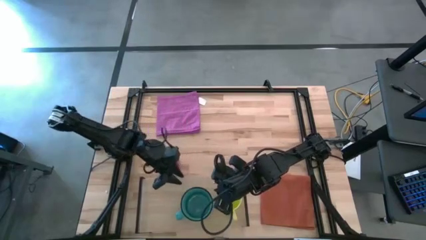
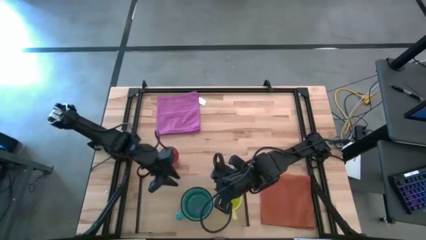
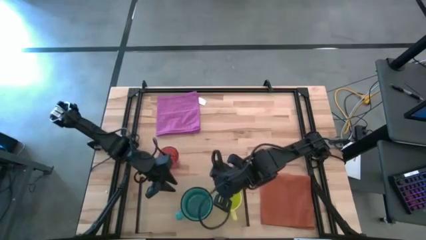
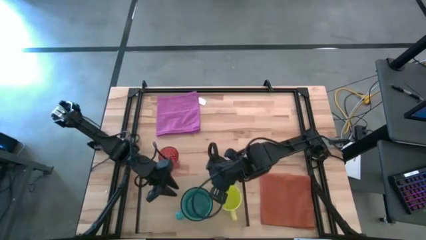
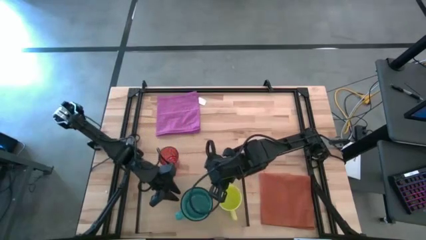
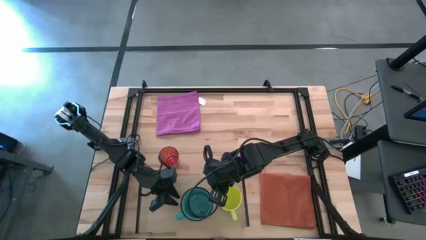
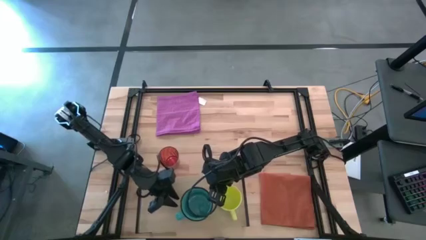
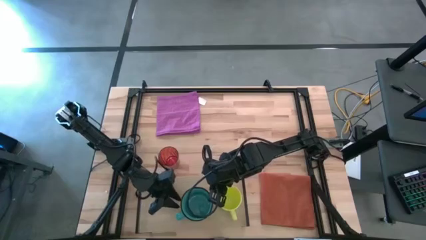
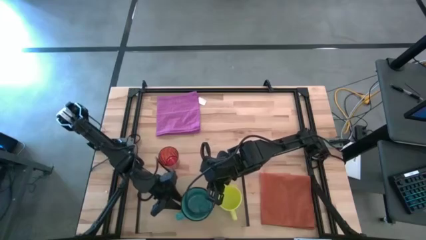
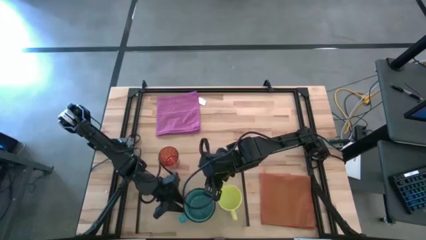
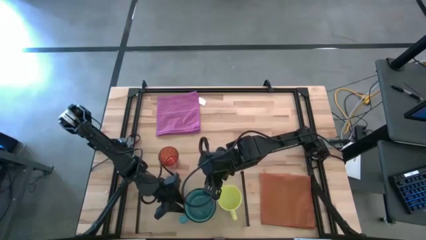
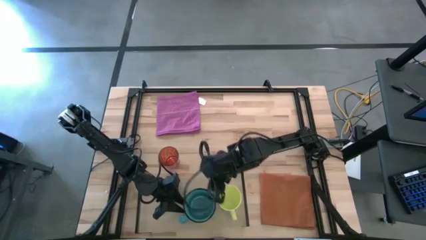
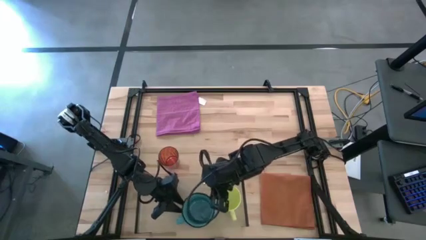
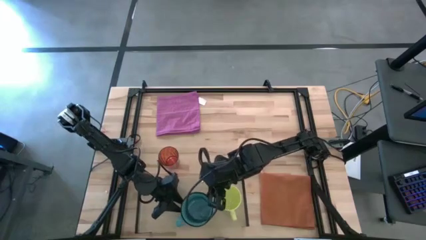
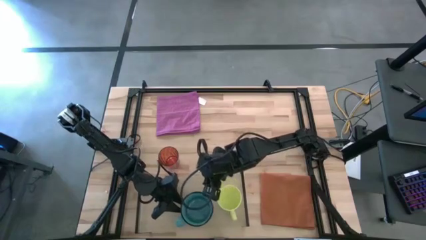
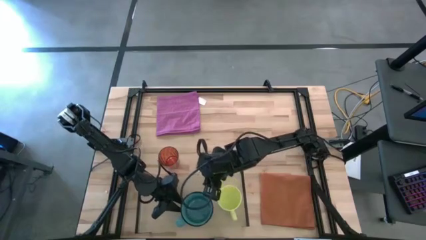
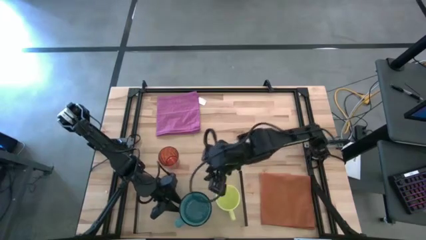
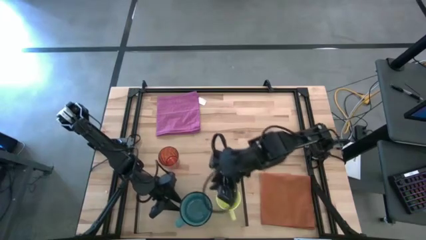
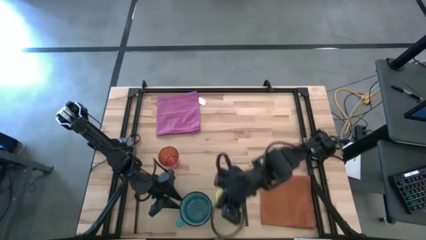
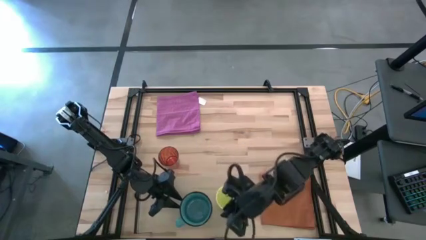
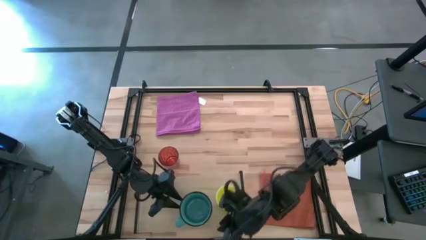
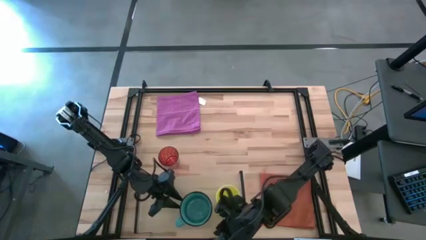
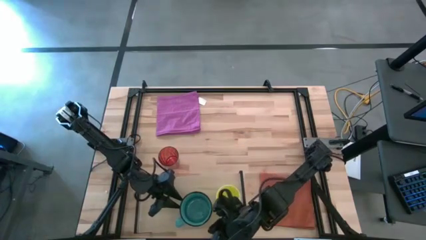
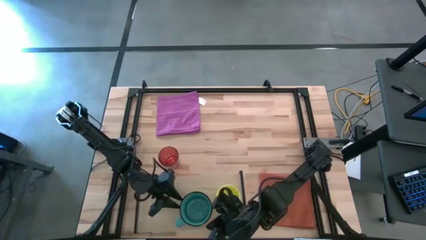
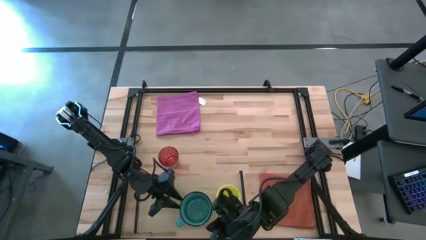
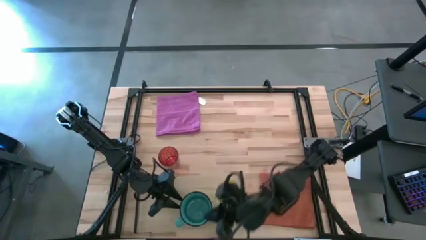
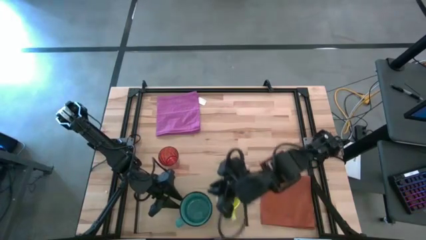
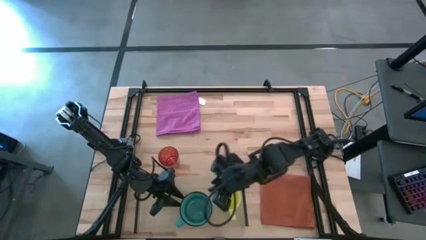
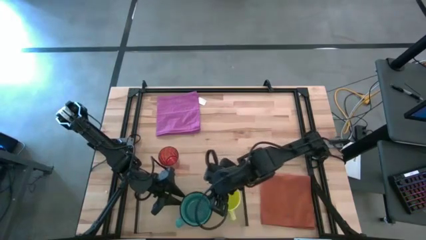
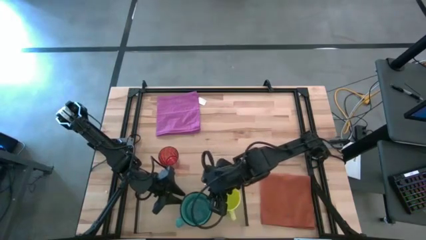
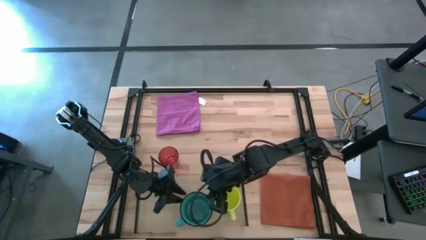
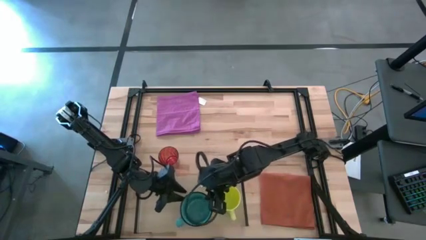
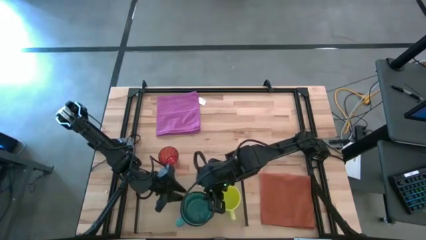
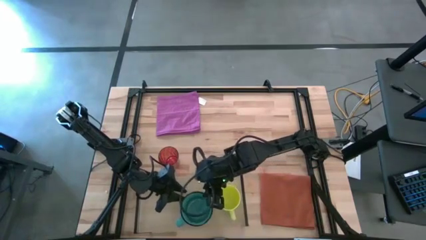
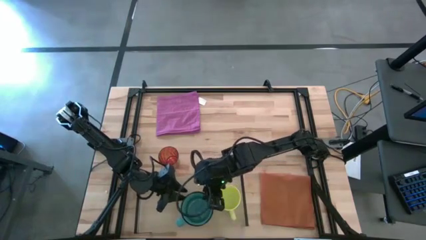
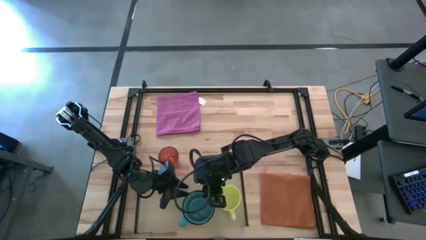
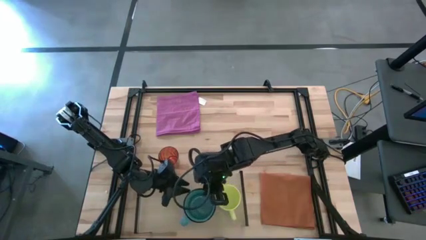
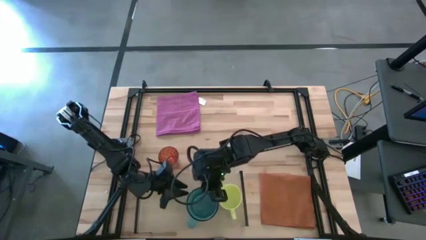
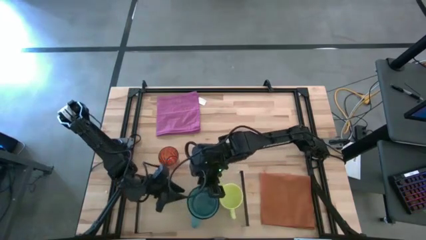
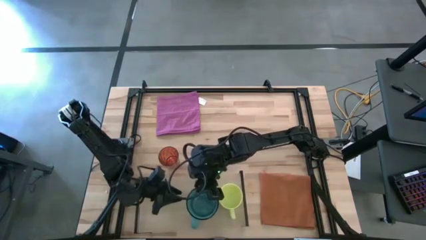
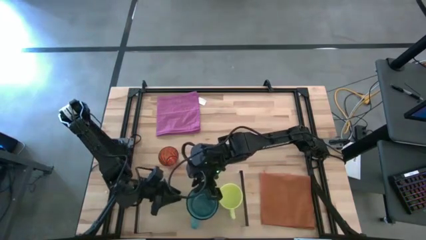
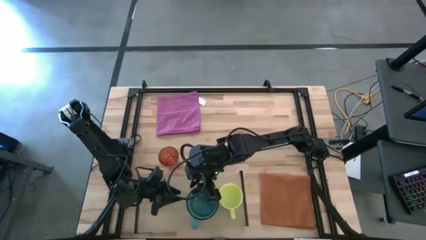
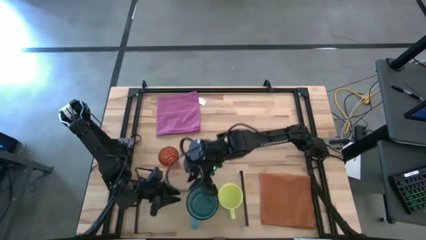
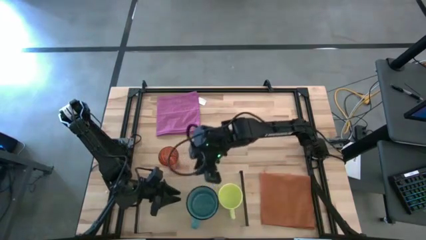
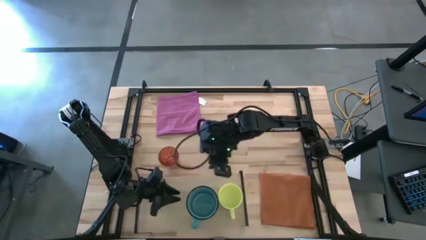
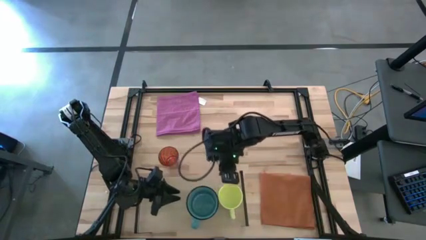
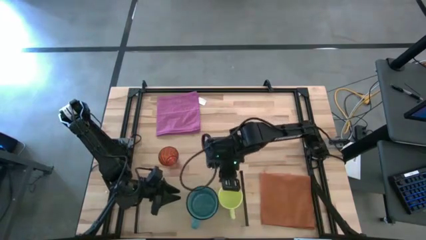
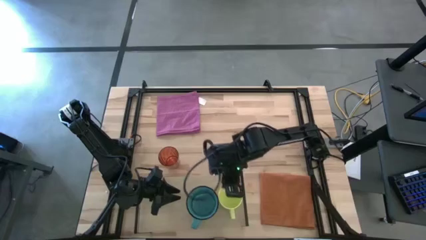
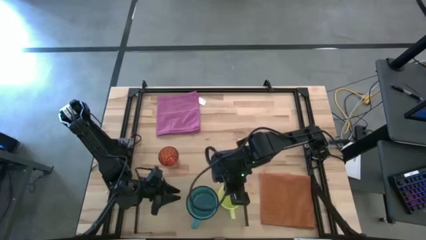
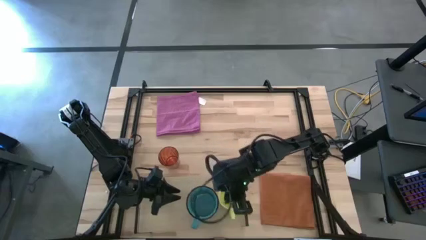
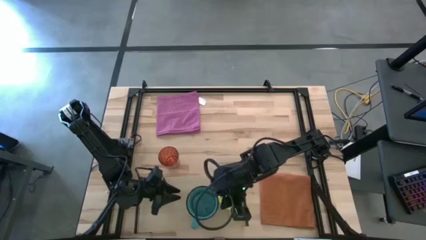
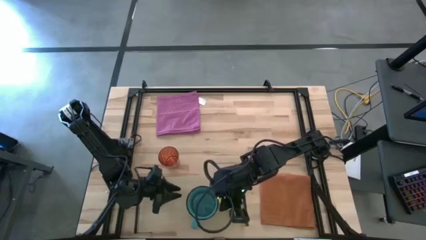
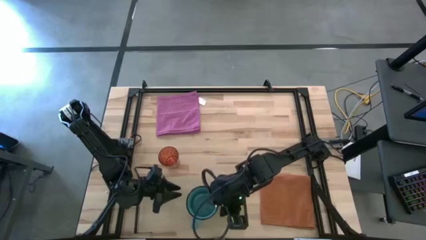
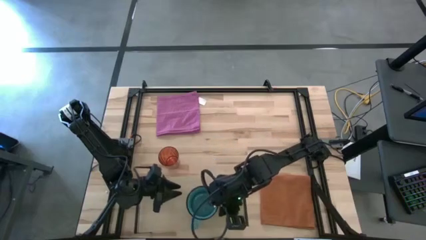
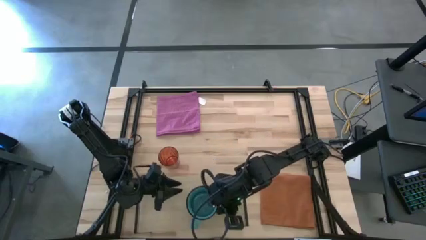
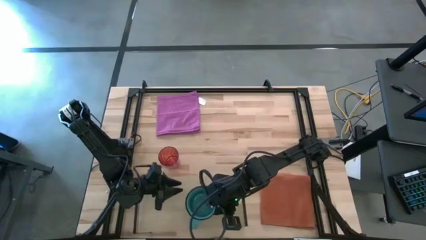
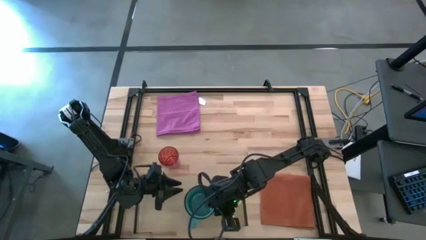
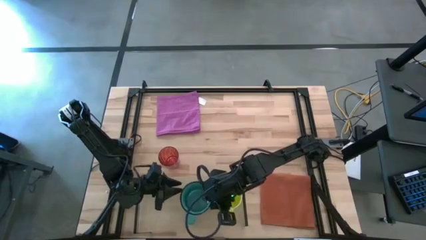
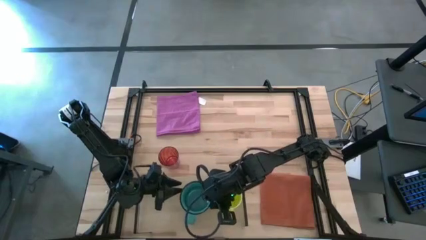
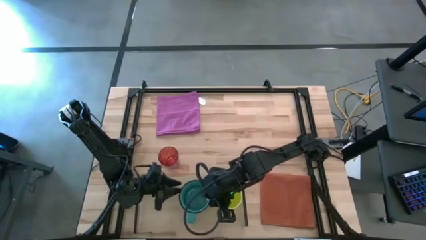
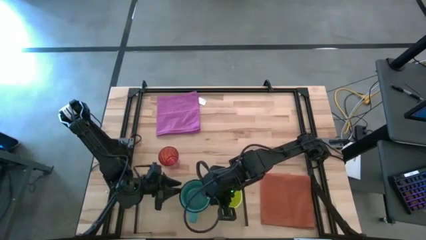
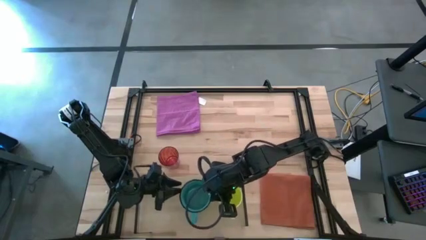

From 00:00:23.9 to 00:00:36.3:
Task: Stack small to large cups/mugs on shelf
Put the blue mug on the shelf

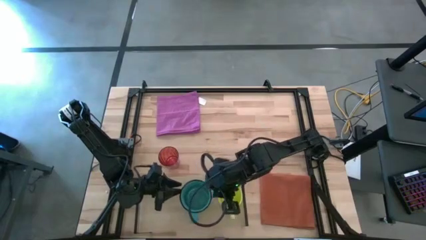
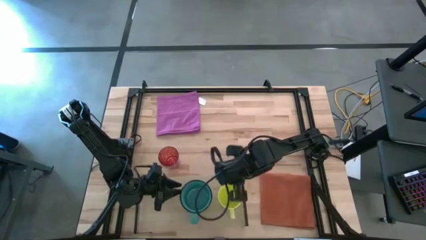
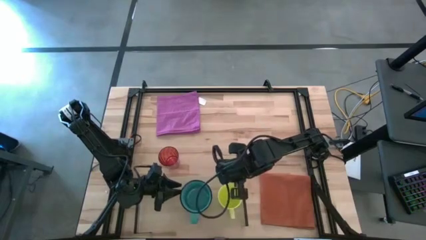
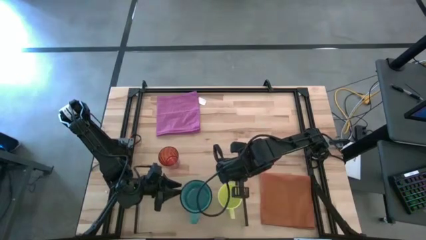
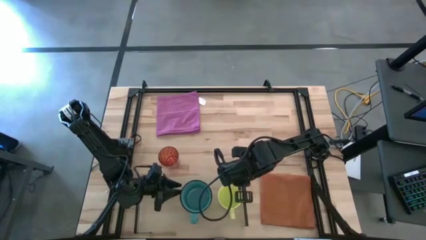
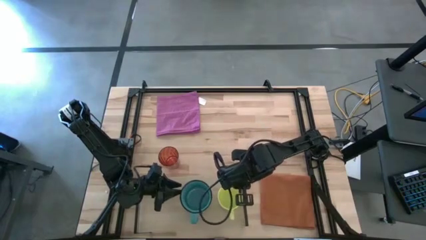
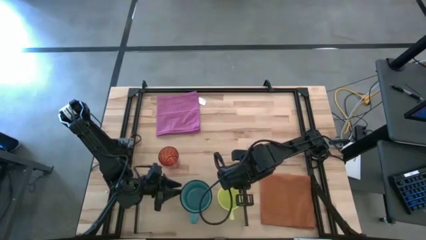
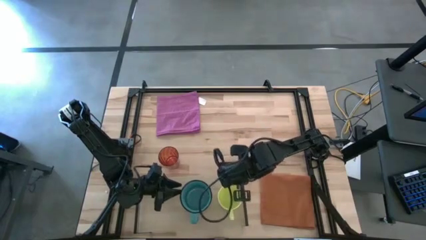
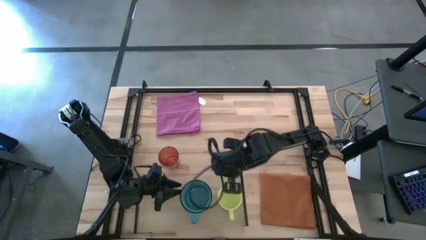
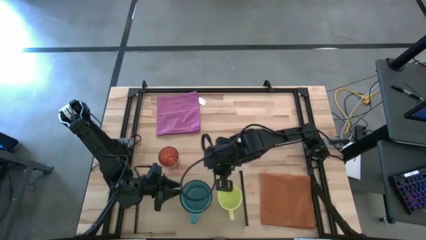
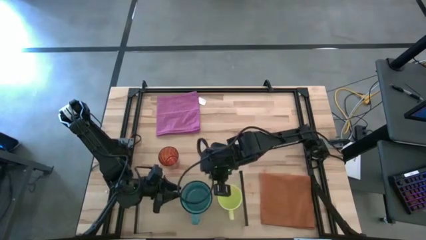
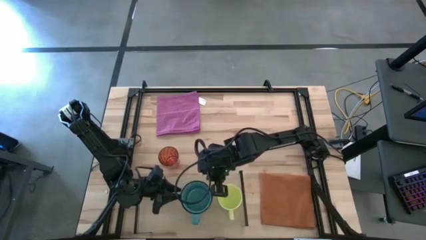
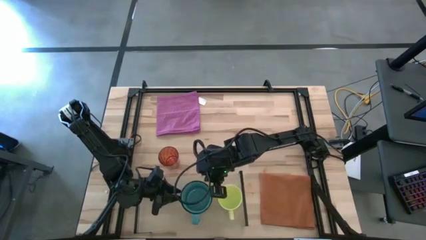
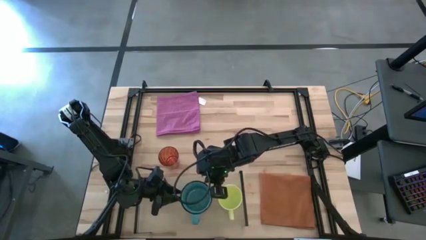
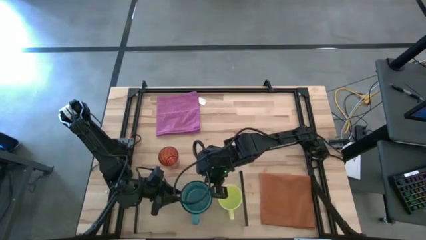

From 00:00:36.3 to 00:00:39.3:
Adjust the mugs on the shelf

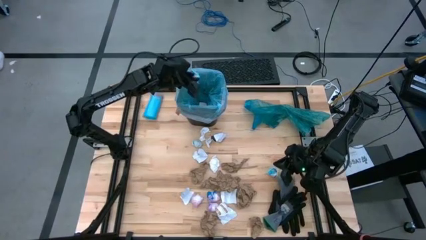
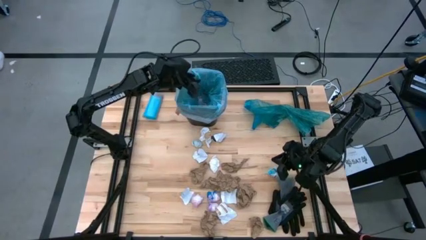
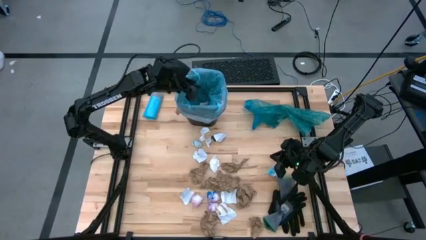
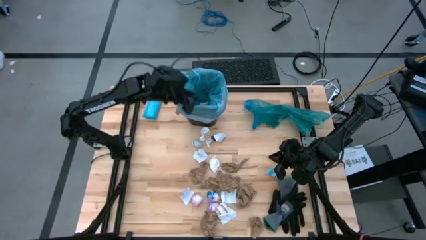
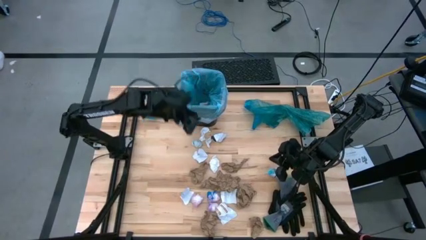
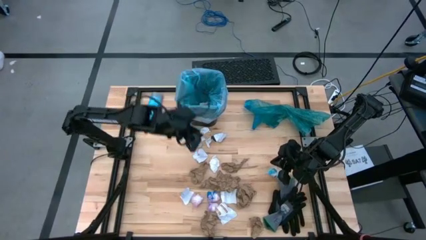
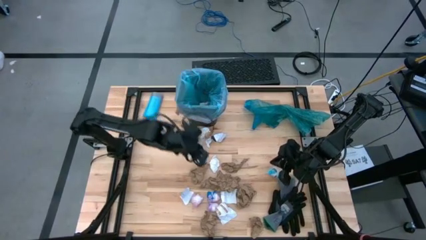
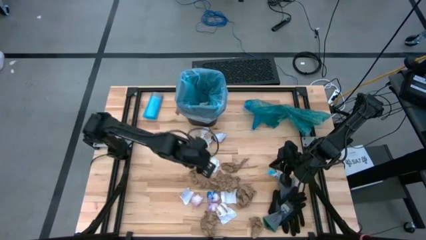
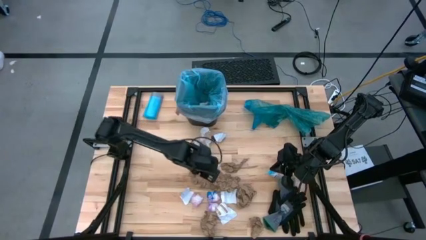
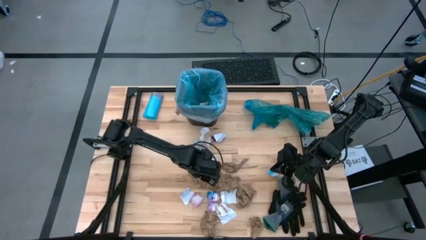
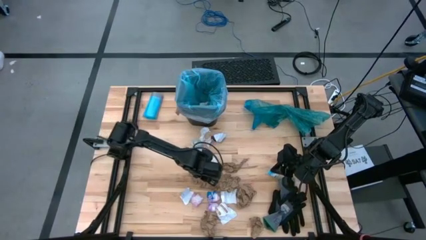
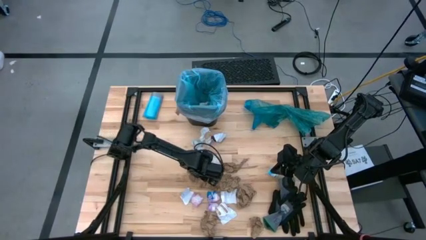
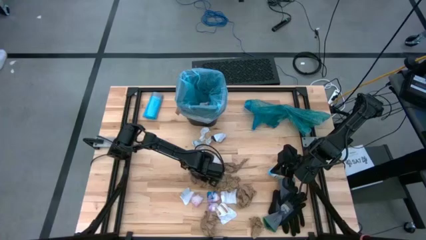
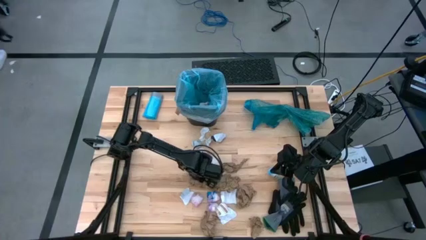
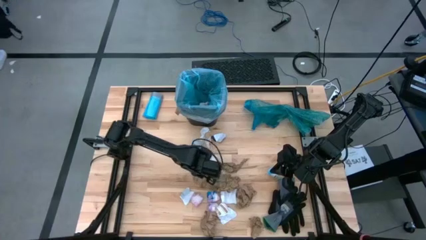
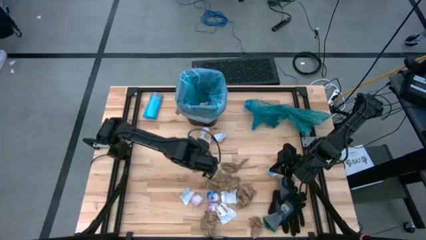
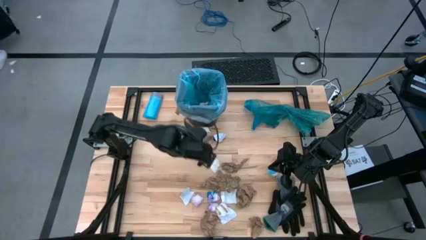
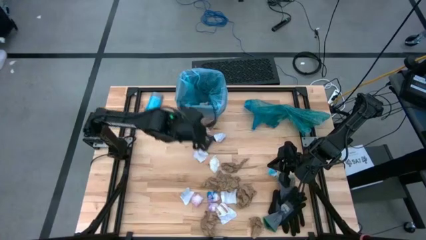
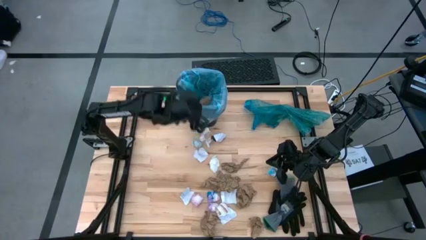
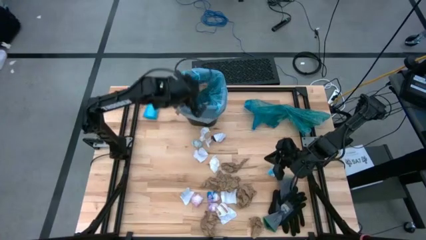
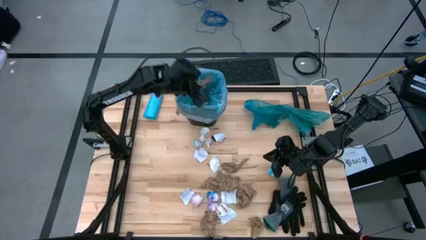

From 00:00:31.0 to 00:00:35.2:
Task: place trash/remove bag and relplace
Put the brown paper trash into the trash bin
